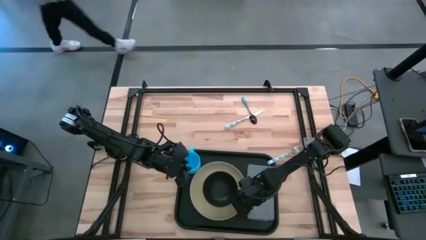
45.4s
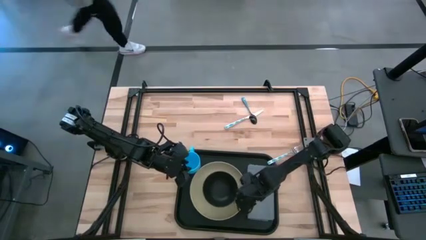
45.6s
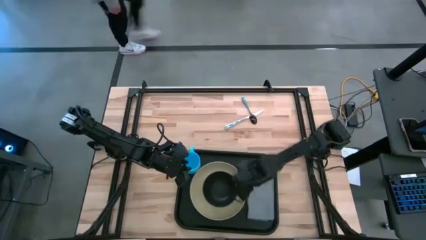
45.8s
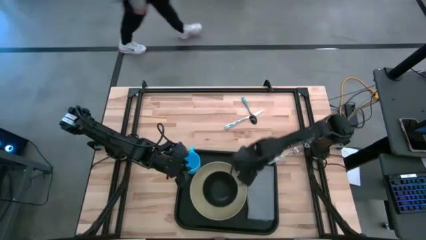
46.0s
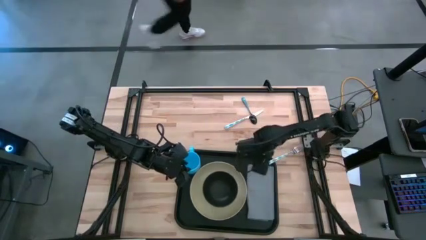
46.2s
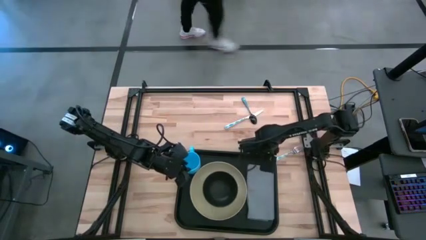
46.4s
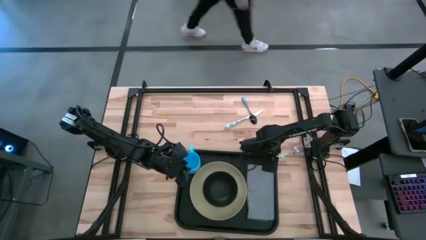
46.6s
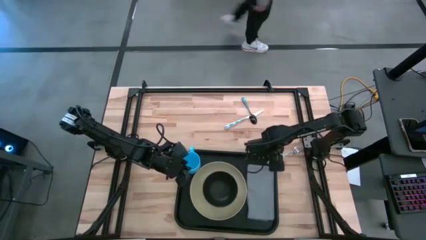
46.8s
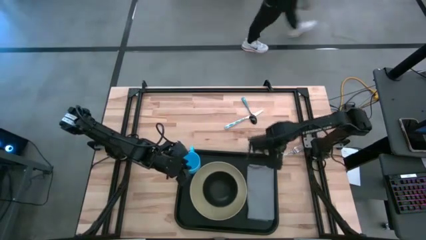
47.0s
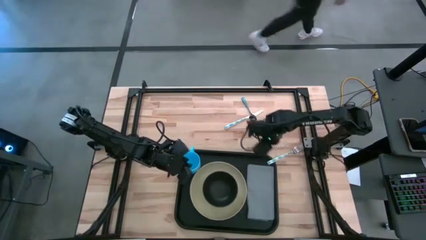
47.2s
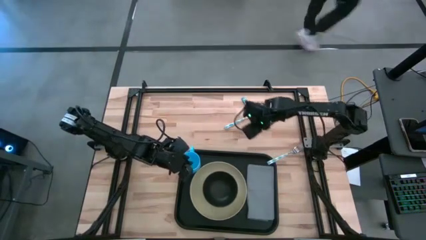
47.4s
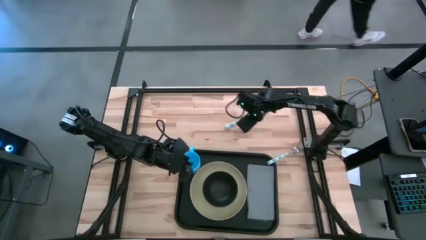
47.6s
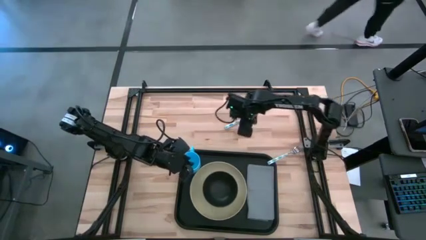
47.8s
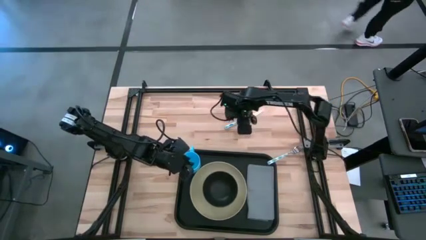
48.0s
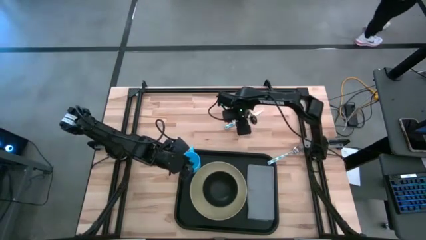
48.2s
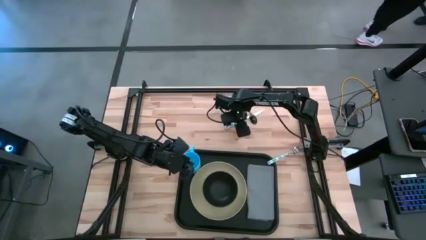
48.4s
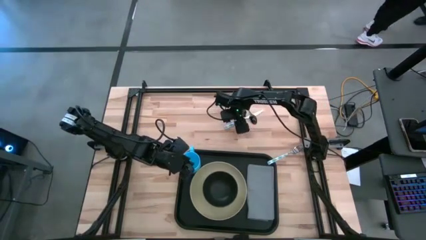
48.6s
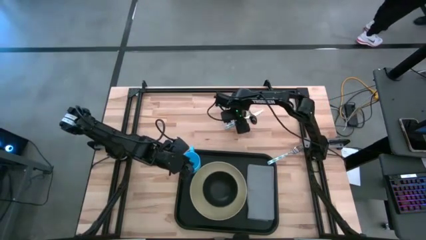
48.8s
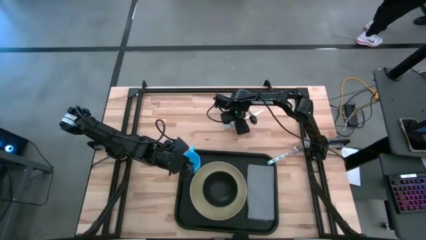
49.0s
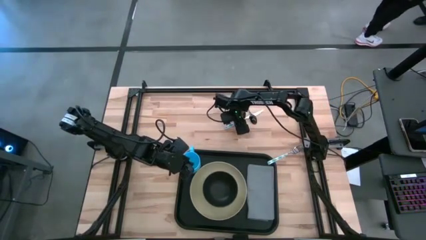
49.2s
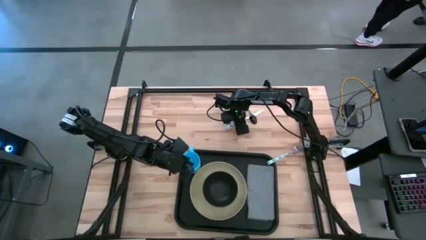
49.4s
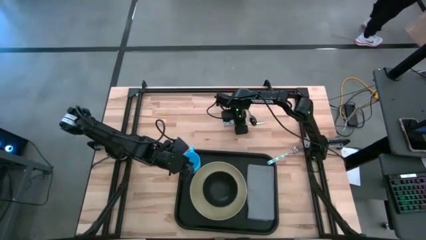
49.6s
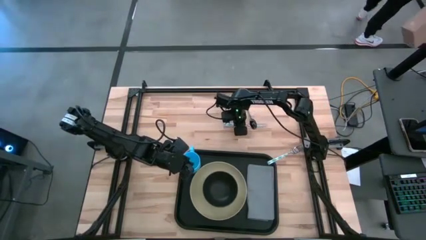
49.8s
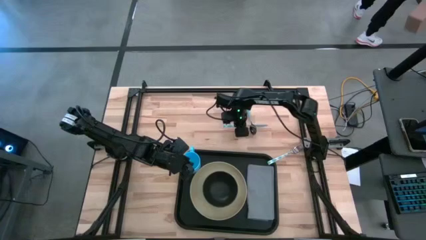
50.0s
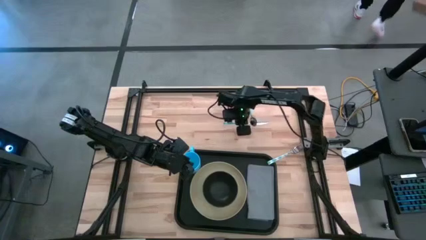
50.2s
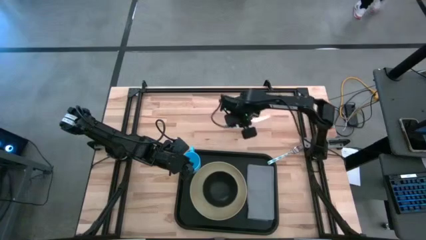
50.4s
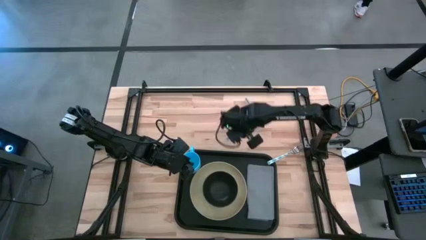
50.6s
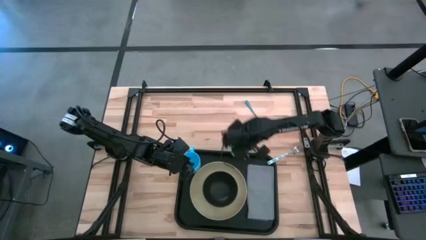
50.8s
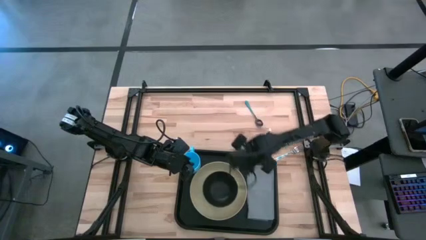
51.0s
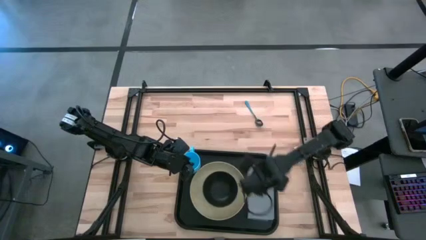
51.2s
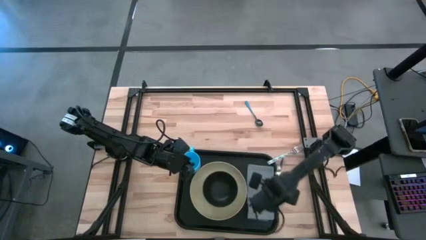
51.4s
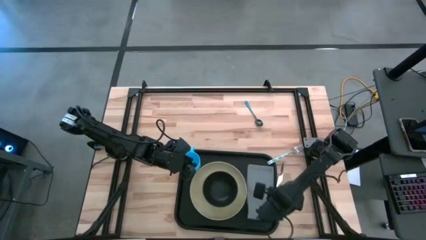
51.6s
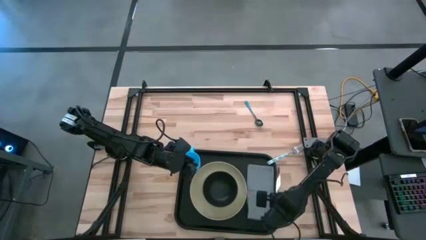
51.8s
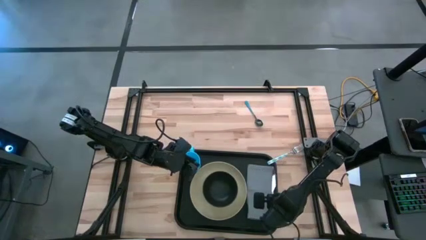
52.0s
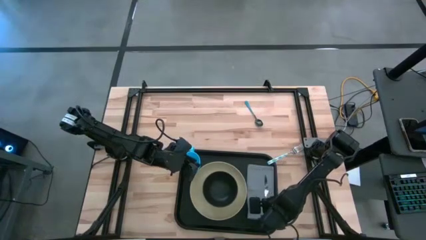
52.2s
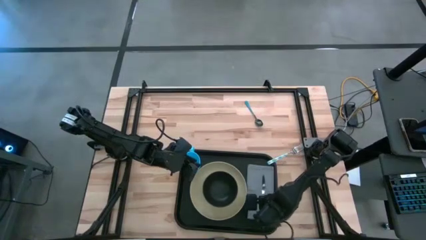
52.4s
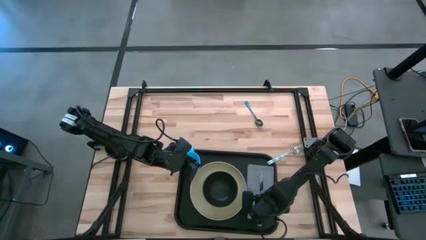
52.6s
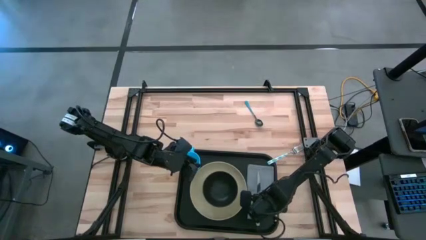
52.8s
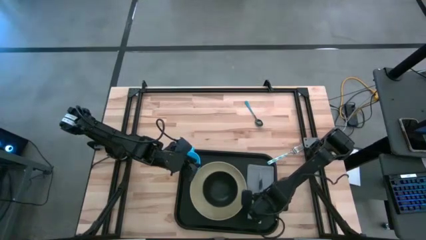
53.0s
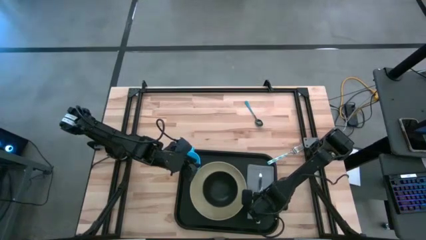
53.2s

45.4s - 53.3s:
Task: Set up tray
Put the white knife on the gray napkin on the black serving tray

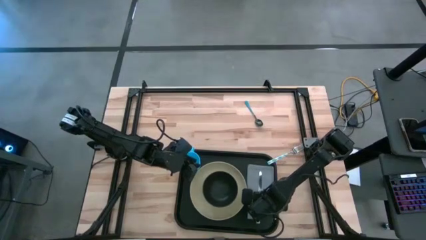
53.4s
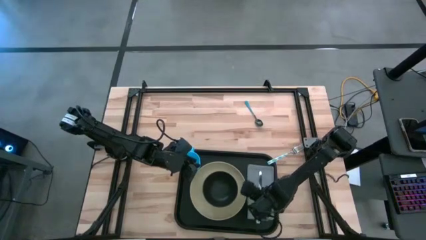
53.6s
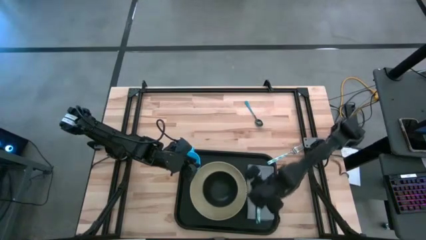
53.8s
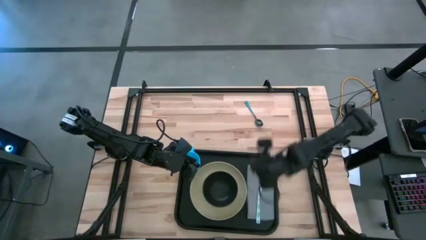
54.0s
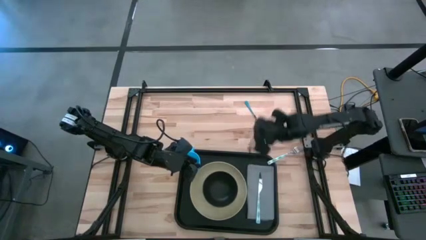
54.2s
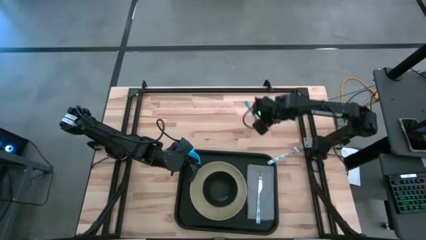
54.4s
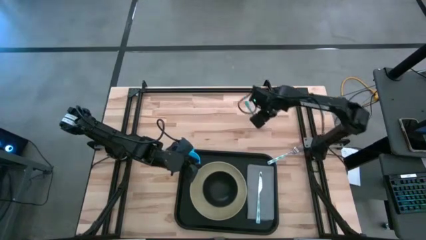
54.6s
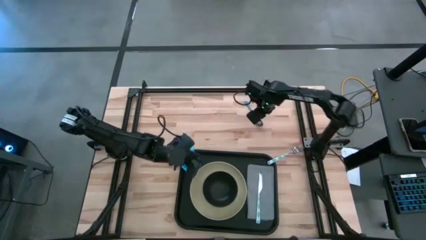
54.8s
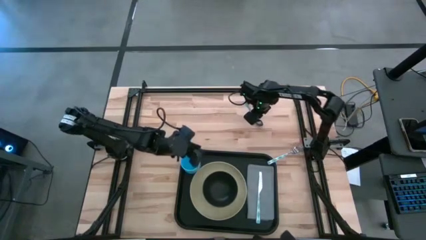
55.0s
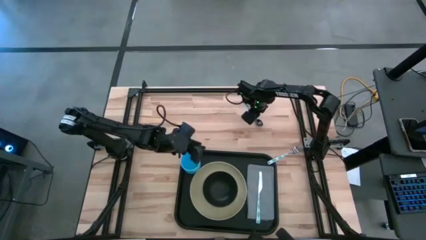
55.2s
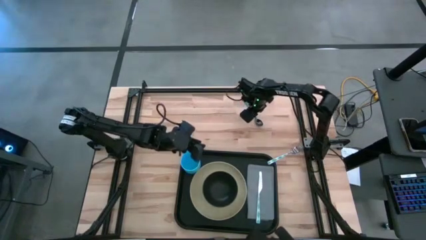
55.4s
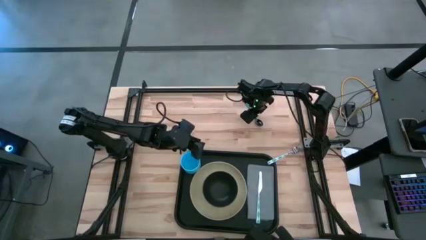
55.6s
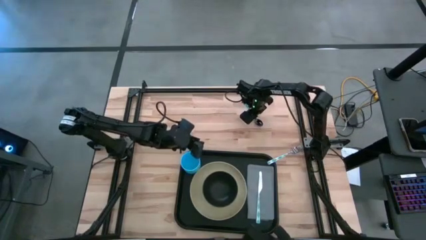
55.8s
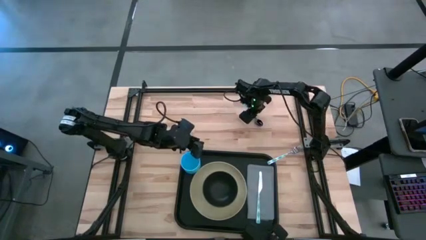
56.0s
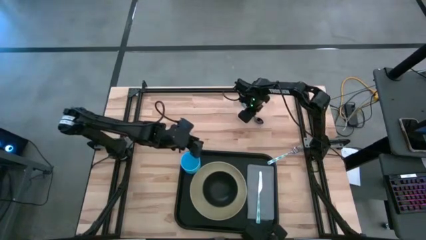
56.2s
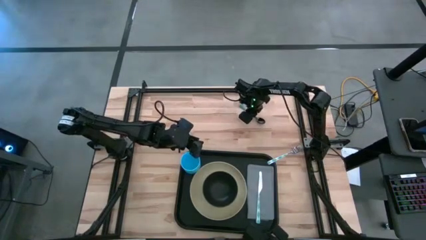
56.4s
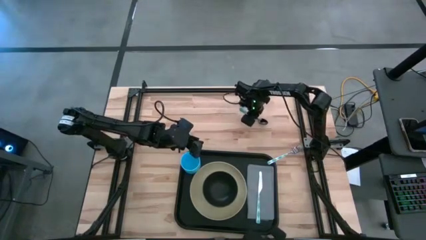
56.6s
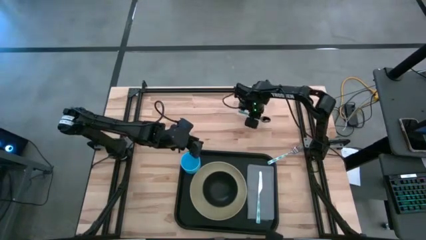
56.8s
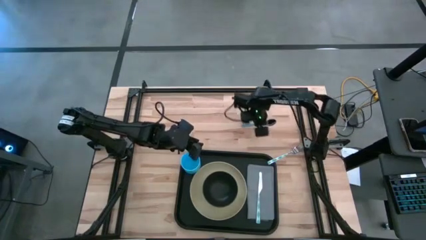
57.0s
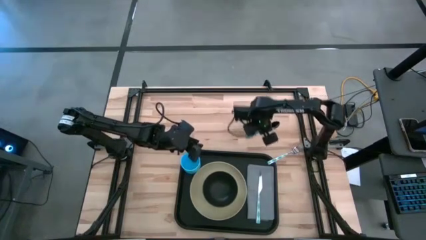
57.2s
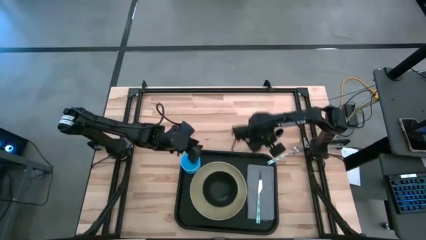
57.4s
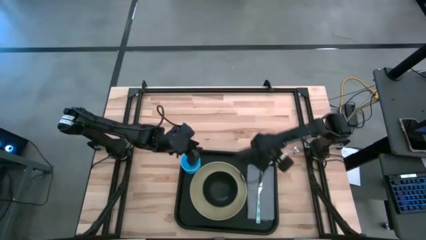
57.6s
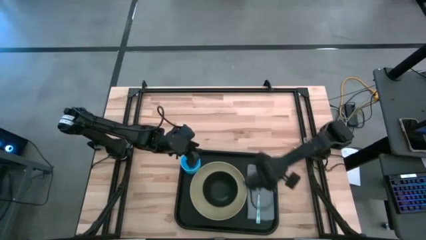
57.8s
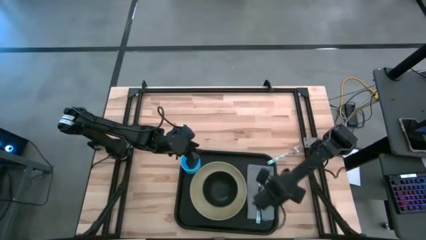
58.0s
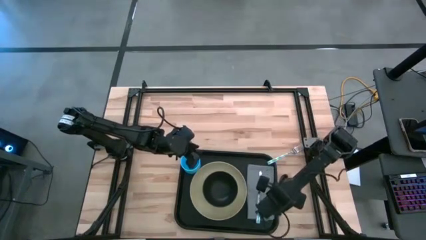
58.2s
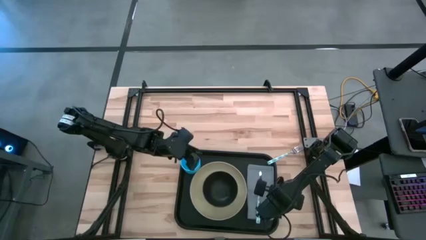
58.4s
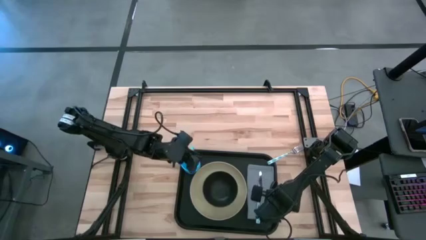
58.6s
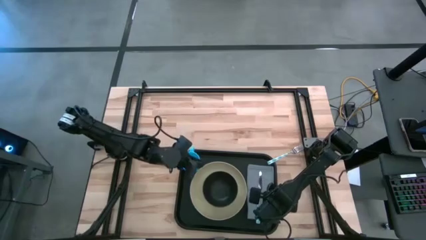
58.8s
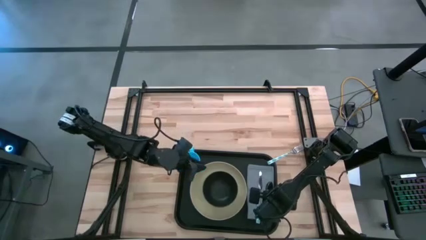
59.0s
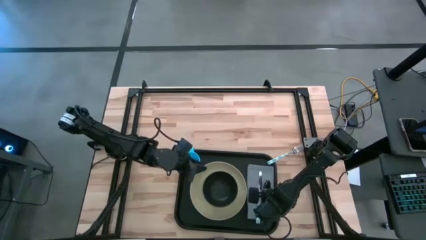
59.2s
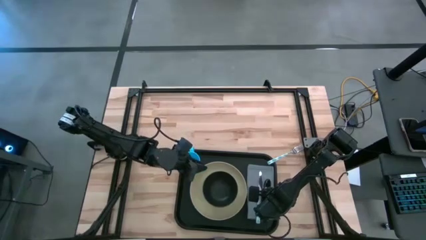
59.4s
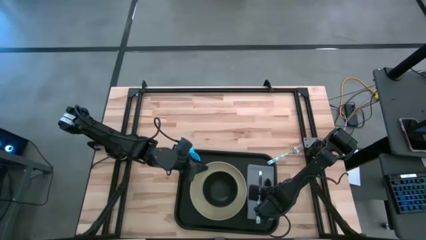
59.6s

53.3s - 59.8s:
Put the blue spoon to the right side of the white knife on the gray napkin on the black serving tray
